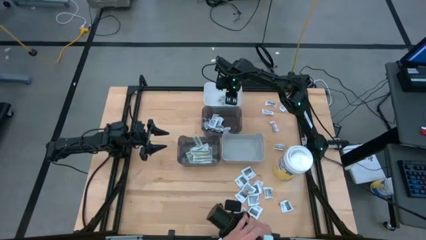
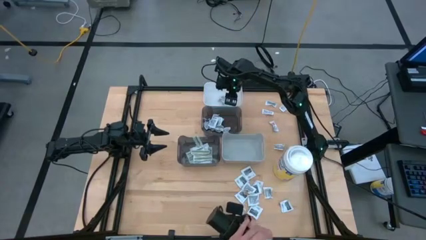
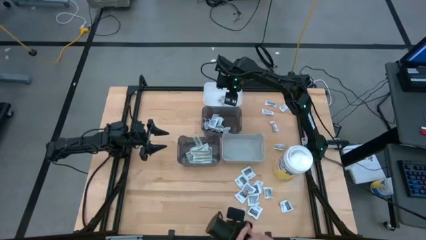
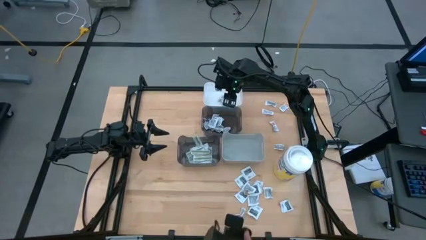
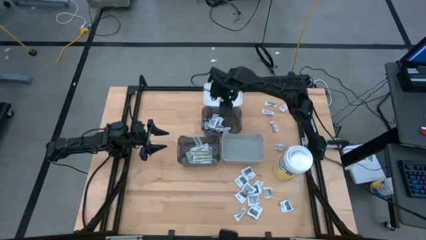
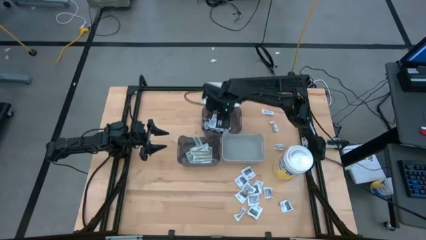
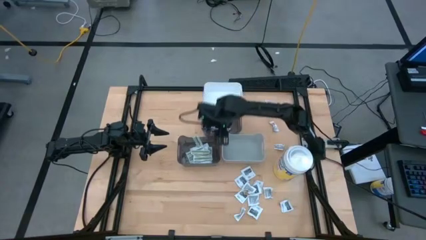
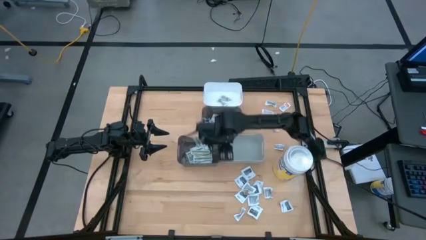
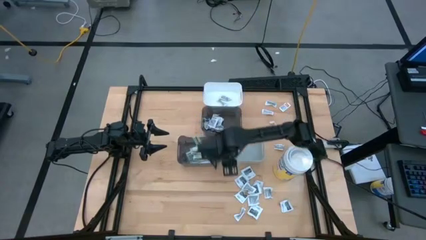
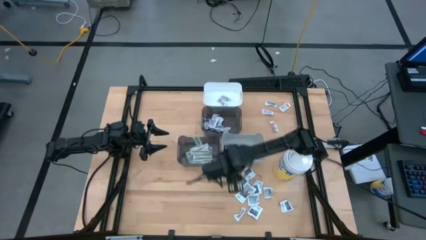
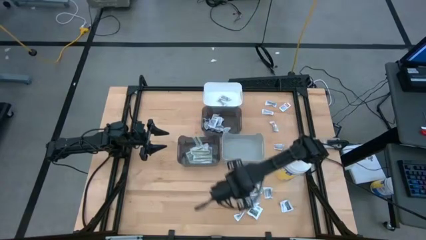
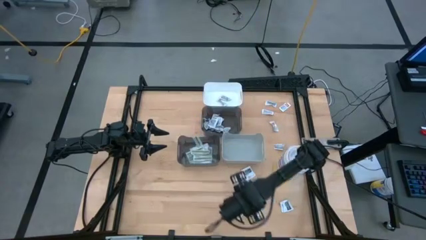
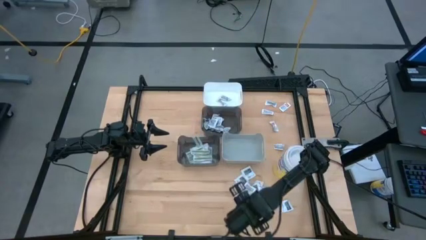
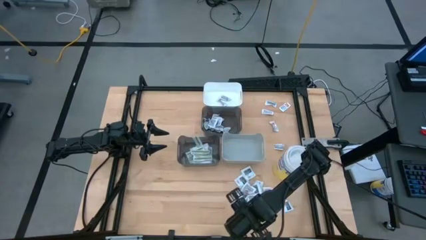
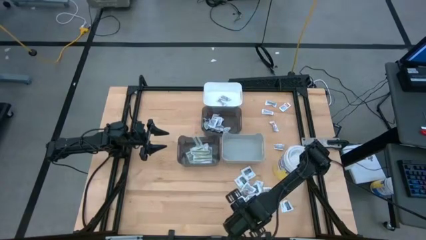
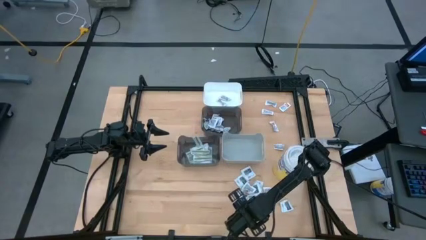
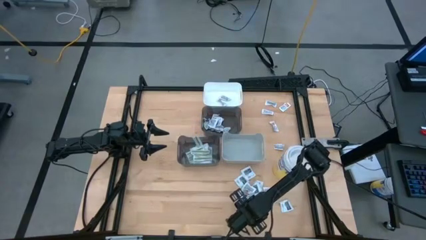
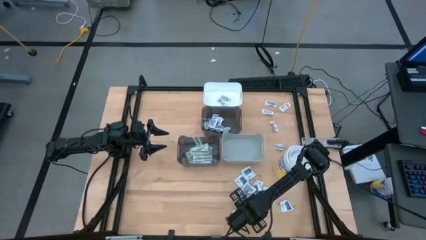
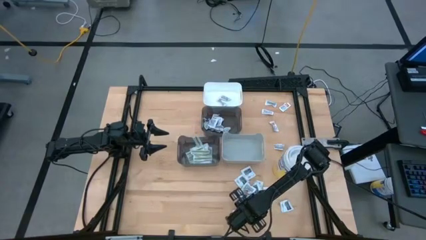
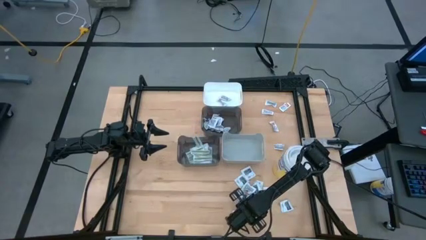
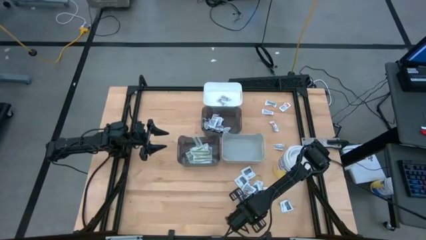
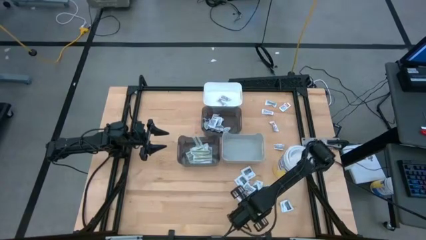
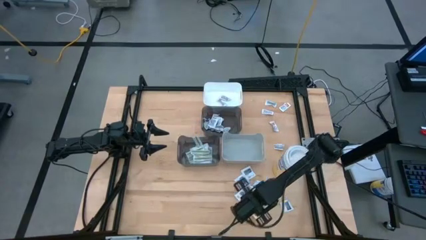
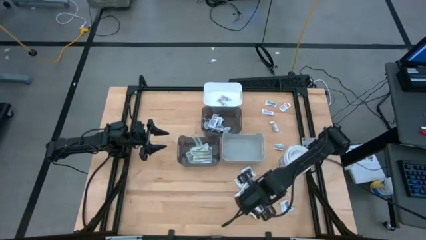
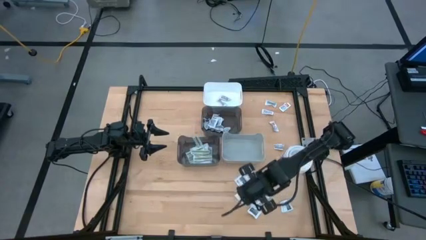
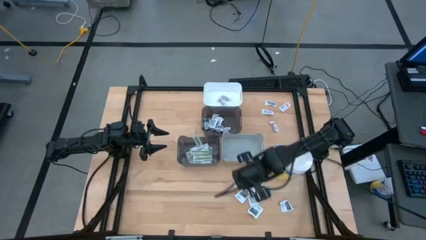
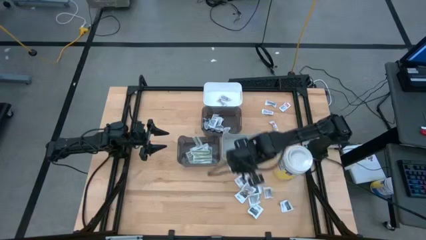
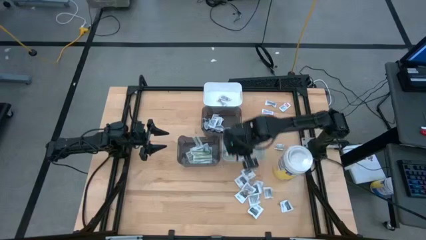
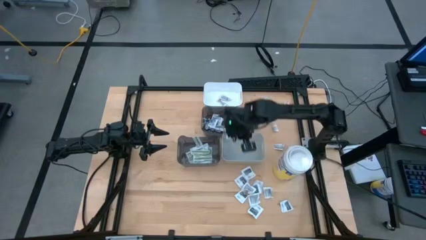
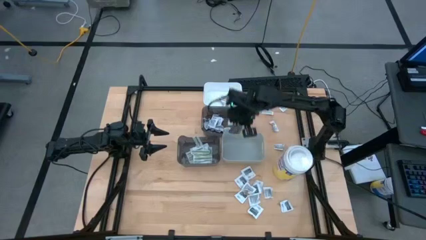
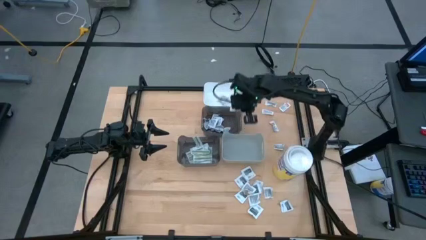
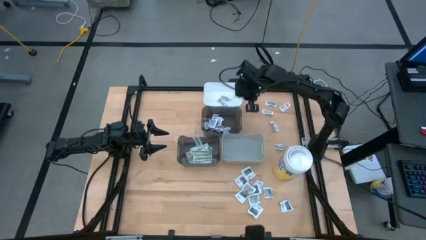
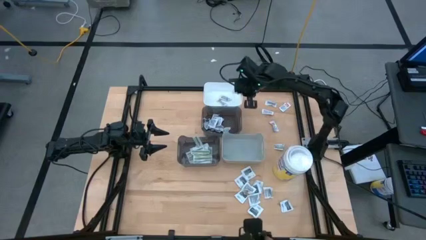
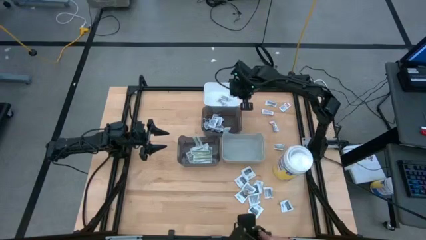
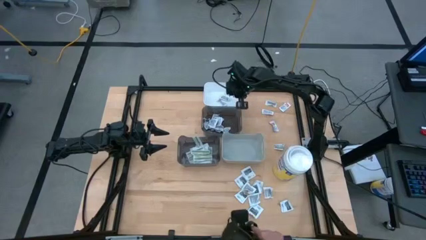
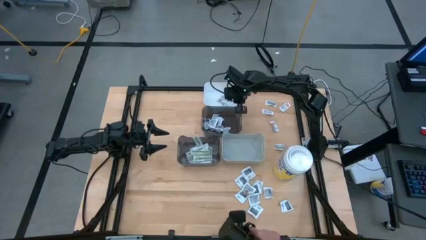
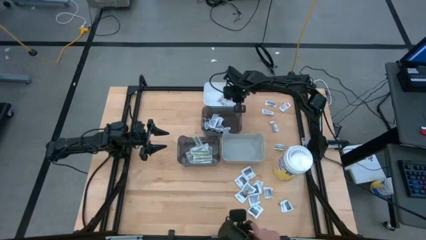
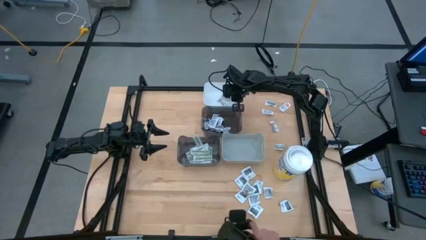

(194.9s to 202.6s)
Task: Pick & Place First Aid Supplies
Put the white ointment pack into the white bin

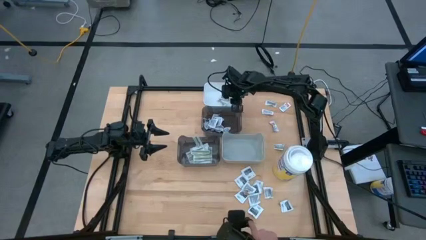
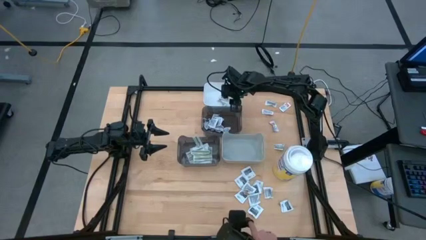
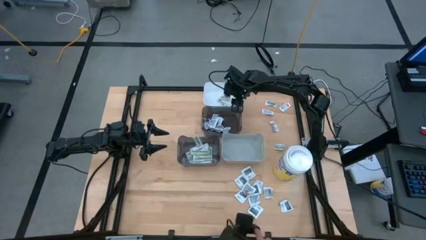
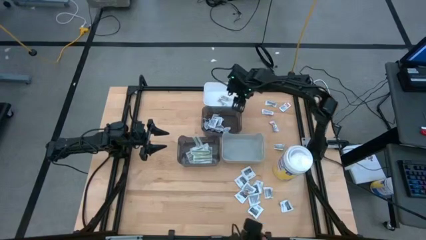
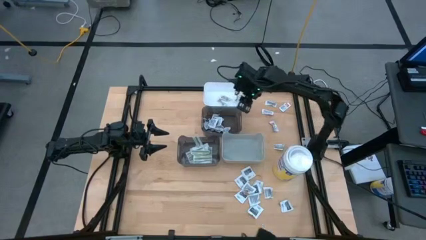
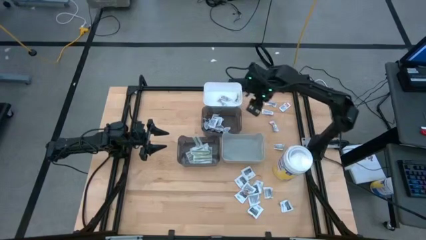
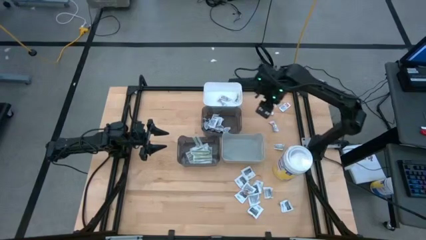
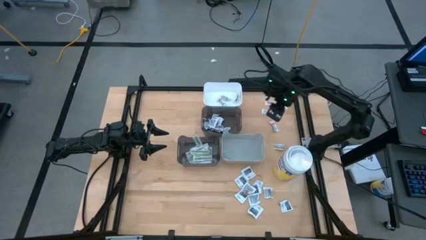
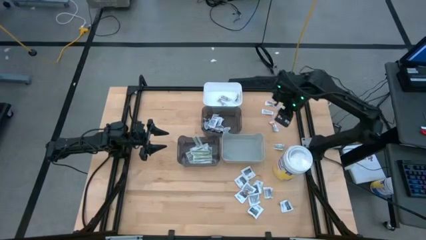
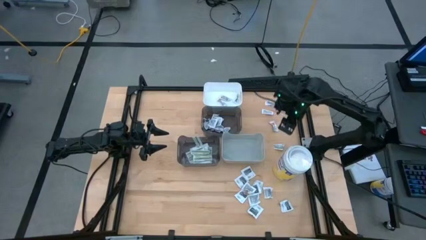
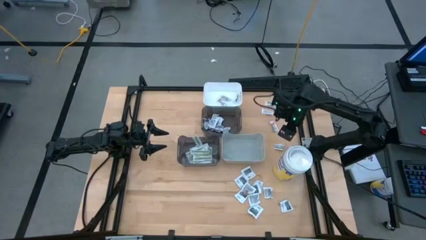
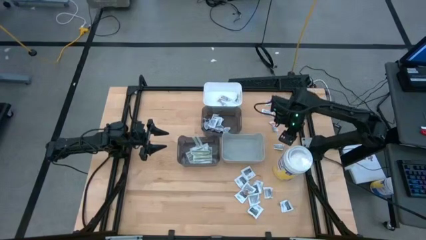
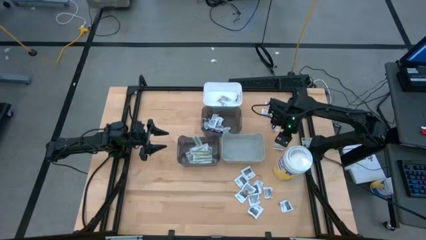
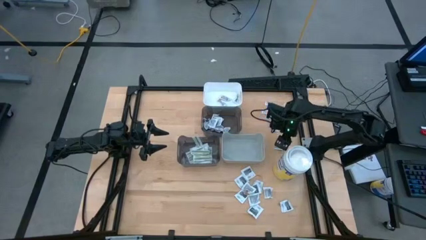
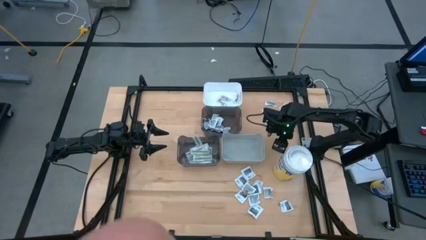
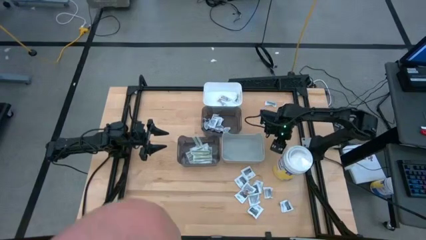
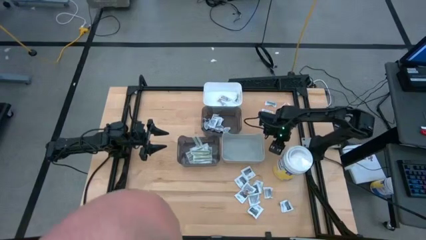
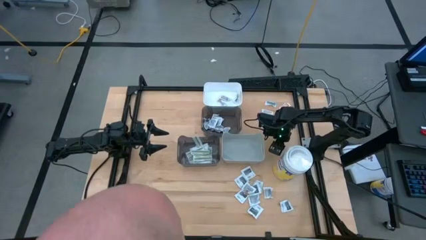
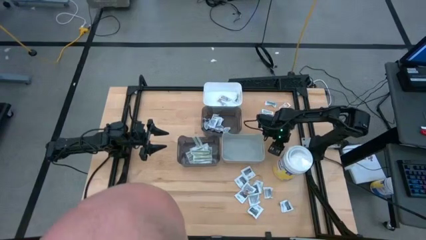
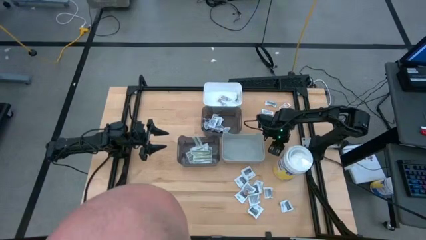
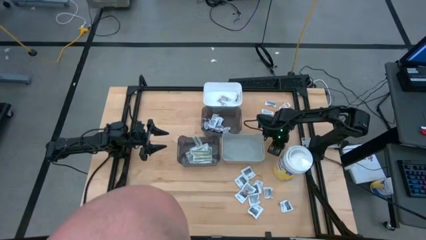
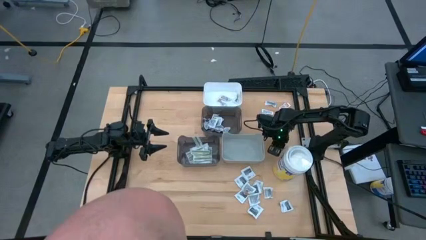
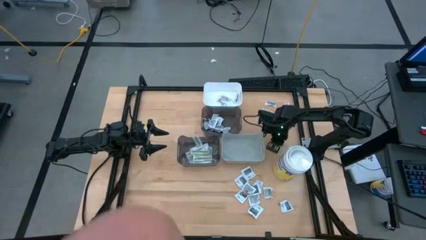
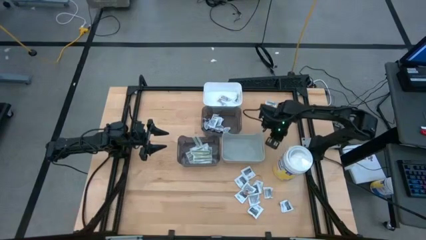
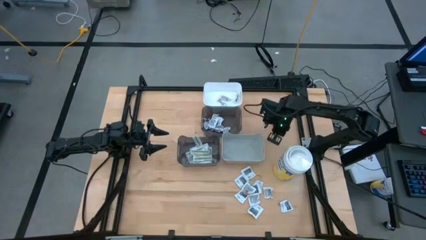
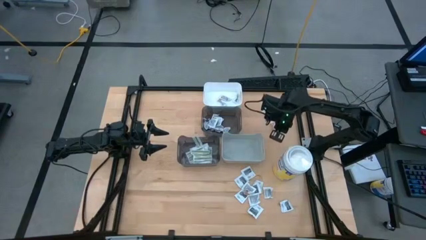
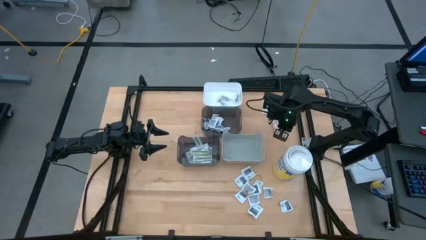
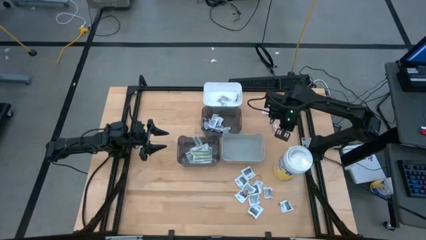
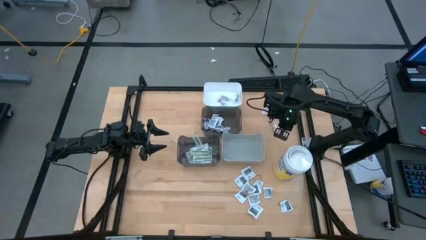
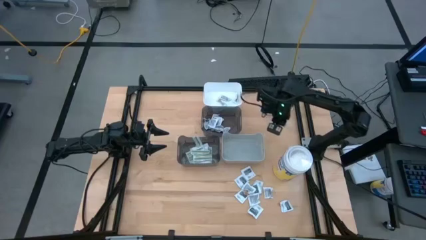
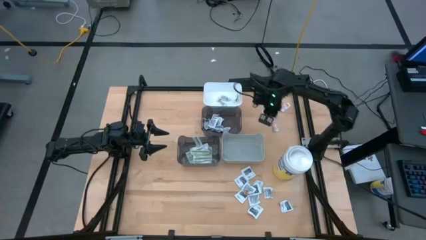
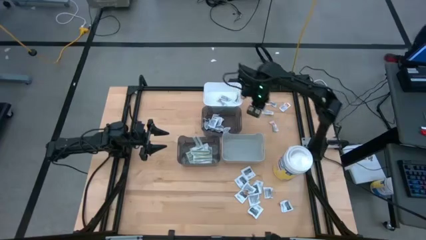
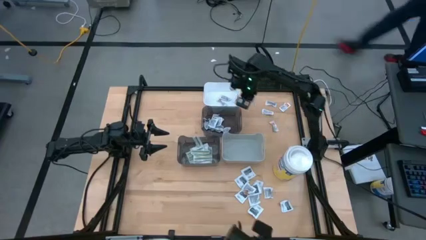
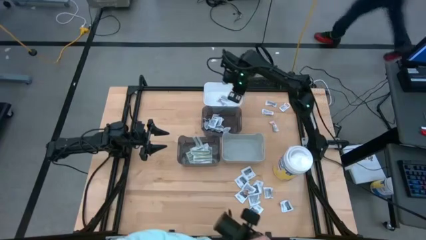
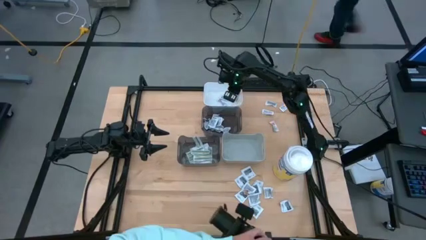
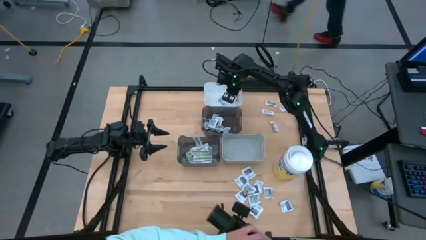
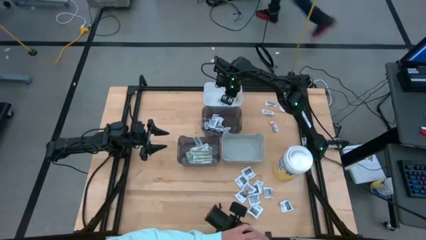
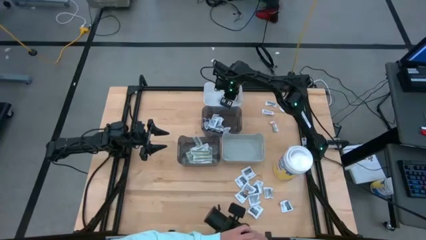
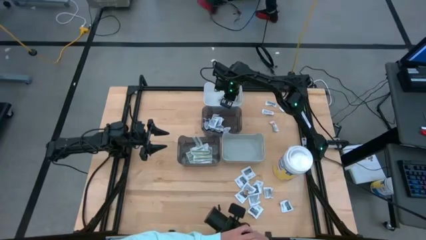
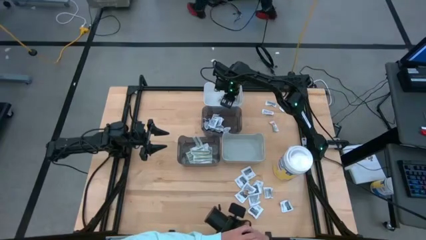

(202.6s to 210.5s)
Put the white ointment pack into the white bin
